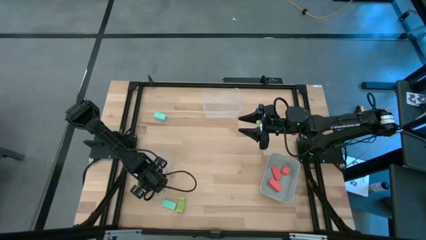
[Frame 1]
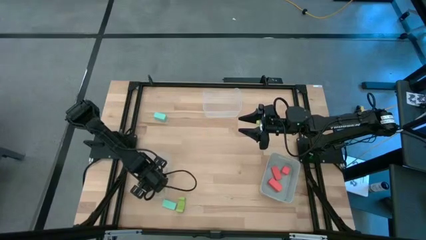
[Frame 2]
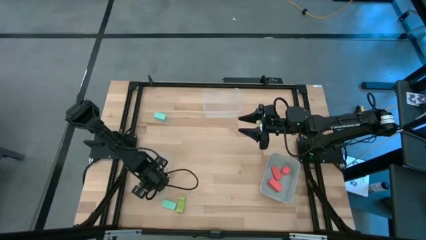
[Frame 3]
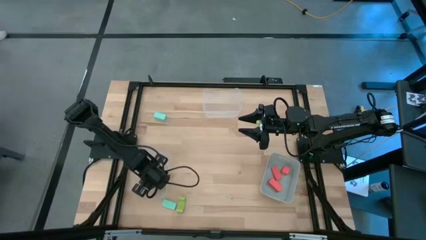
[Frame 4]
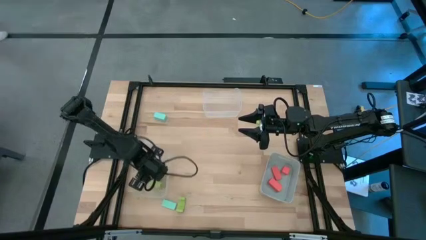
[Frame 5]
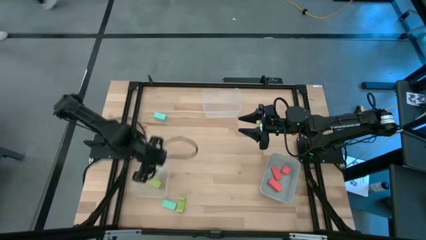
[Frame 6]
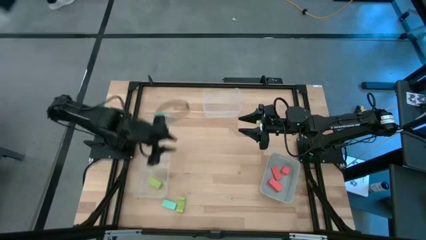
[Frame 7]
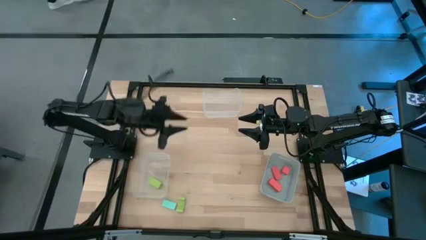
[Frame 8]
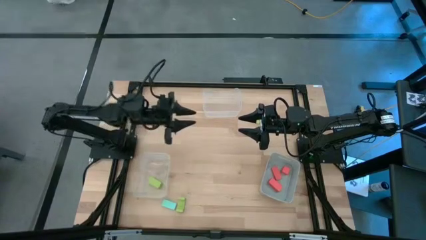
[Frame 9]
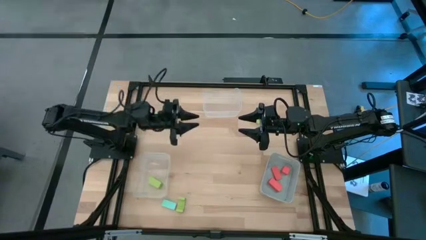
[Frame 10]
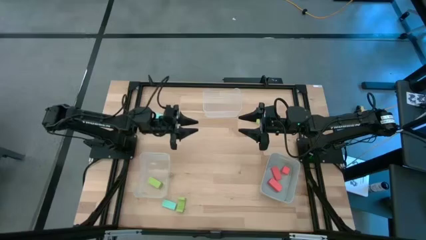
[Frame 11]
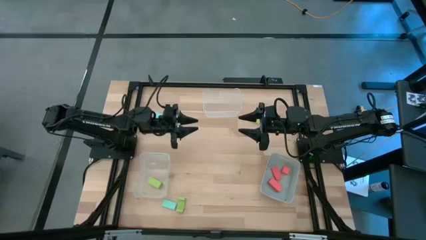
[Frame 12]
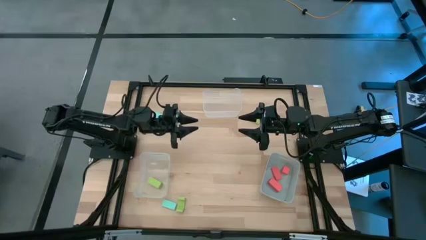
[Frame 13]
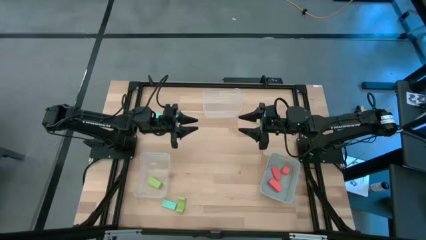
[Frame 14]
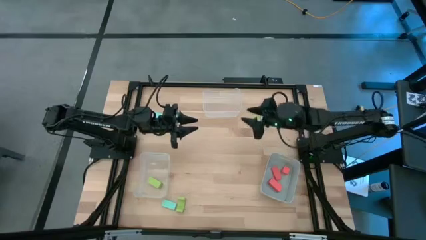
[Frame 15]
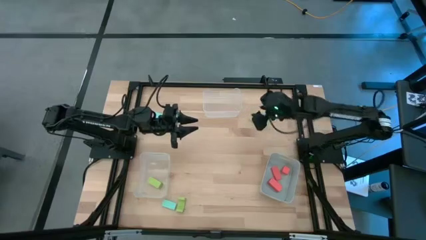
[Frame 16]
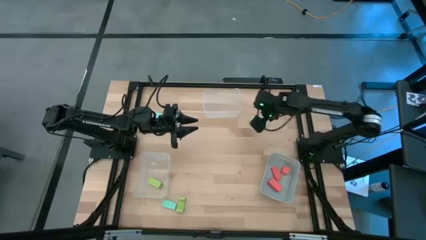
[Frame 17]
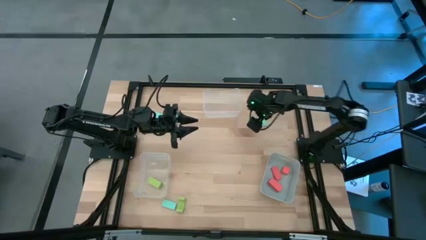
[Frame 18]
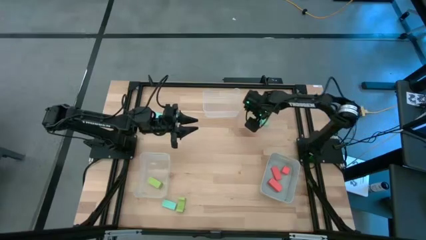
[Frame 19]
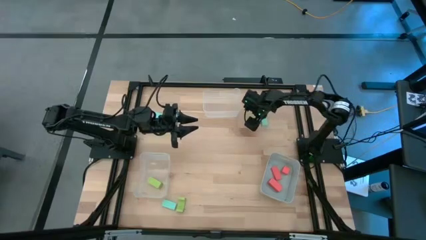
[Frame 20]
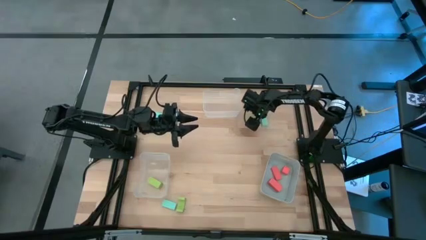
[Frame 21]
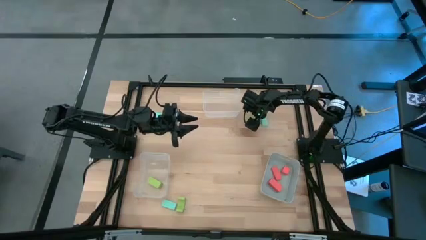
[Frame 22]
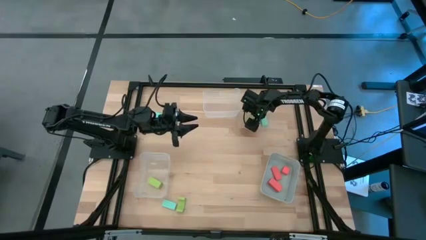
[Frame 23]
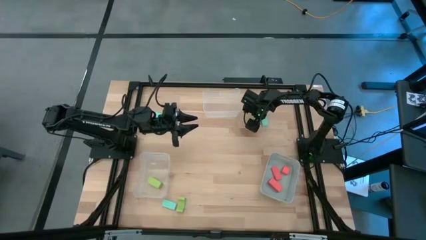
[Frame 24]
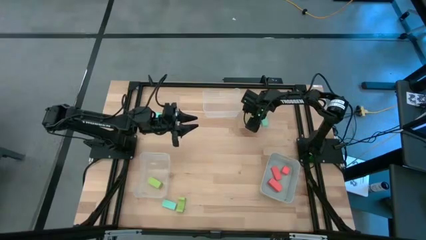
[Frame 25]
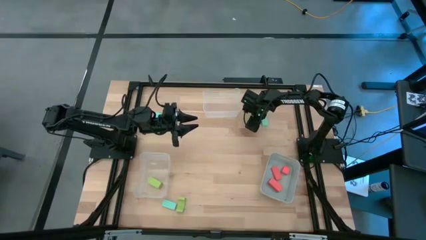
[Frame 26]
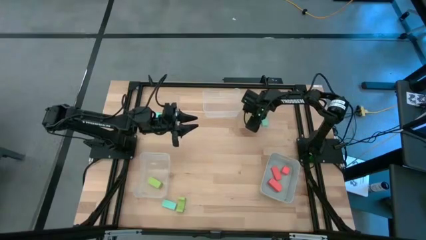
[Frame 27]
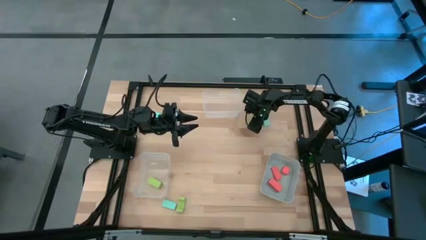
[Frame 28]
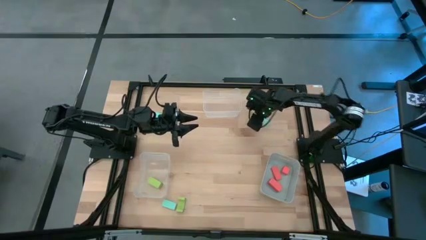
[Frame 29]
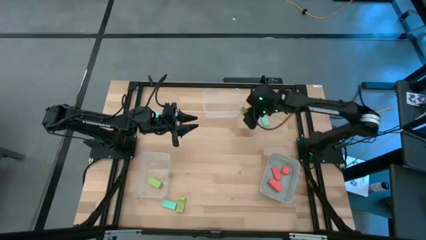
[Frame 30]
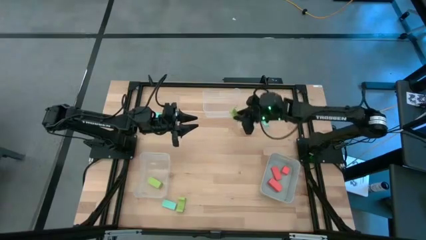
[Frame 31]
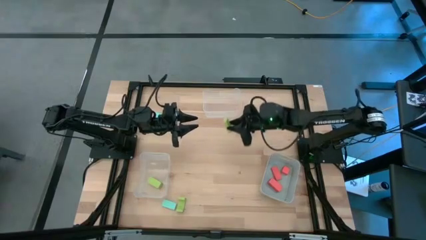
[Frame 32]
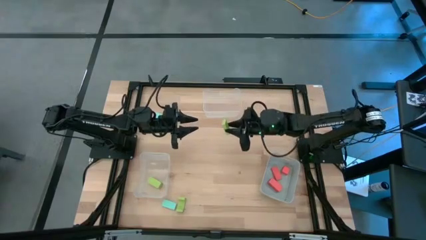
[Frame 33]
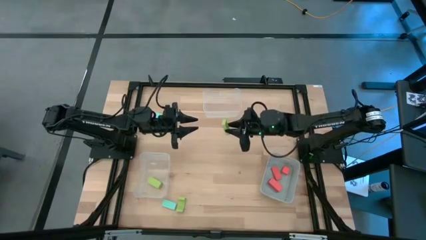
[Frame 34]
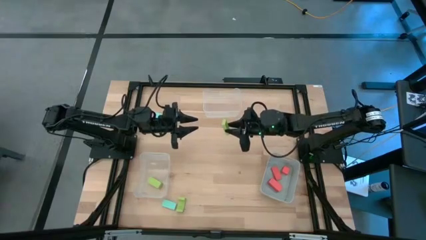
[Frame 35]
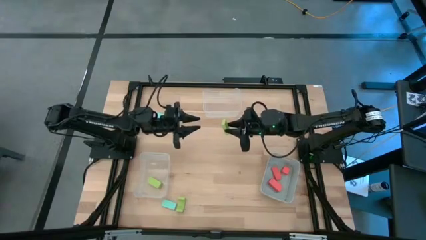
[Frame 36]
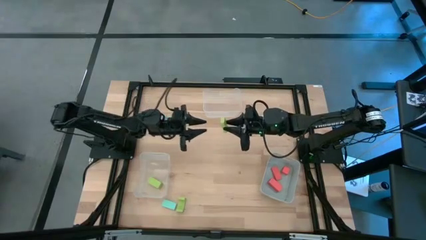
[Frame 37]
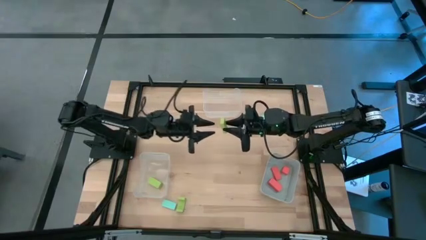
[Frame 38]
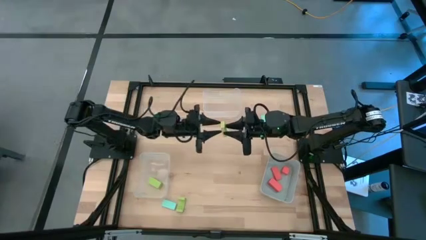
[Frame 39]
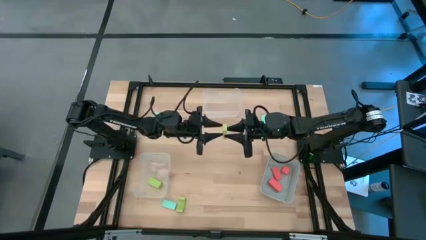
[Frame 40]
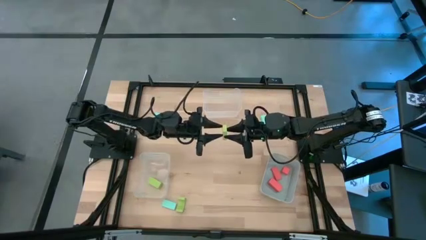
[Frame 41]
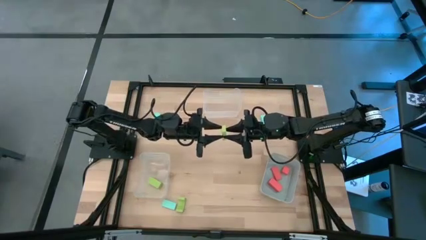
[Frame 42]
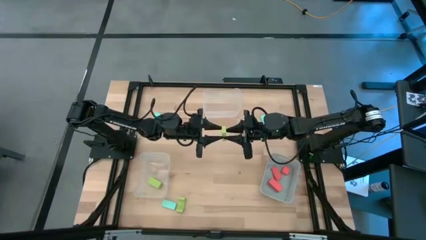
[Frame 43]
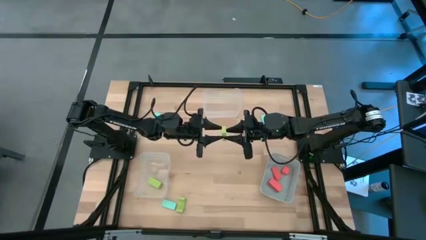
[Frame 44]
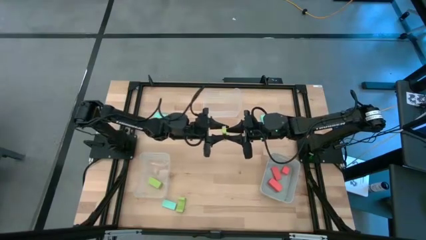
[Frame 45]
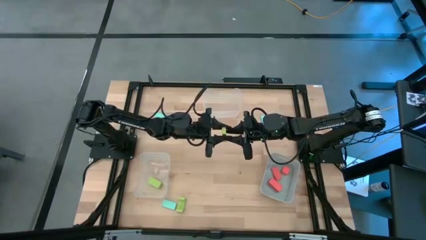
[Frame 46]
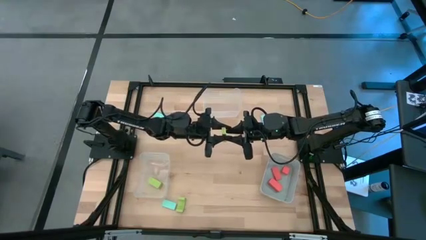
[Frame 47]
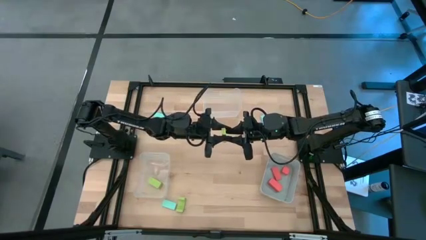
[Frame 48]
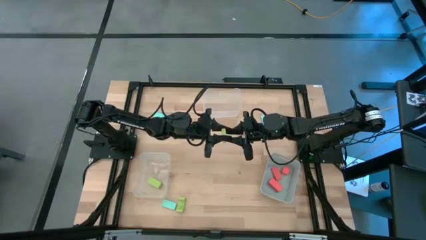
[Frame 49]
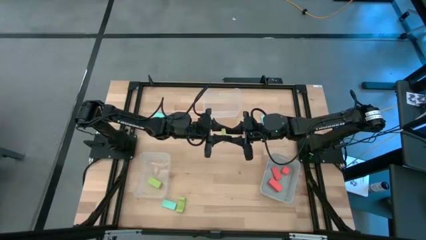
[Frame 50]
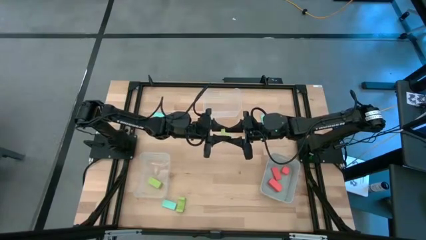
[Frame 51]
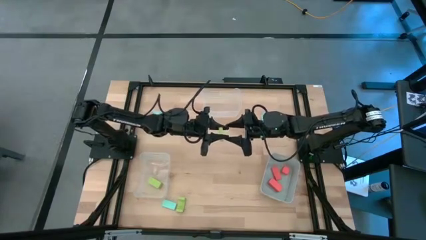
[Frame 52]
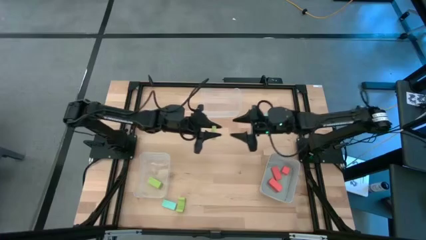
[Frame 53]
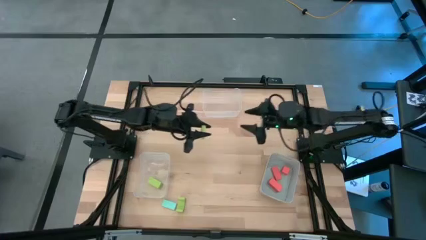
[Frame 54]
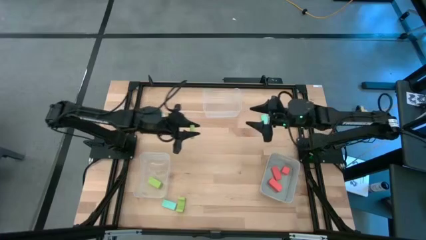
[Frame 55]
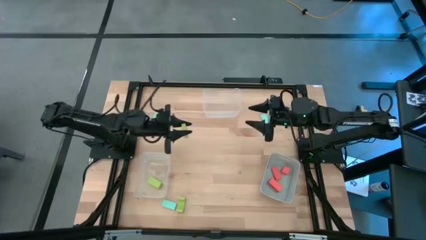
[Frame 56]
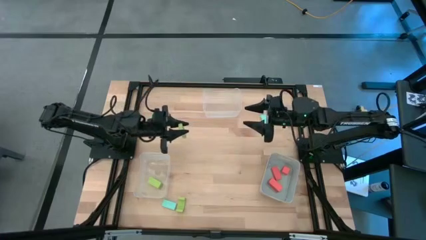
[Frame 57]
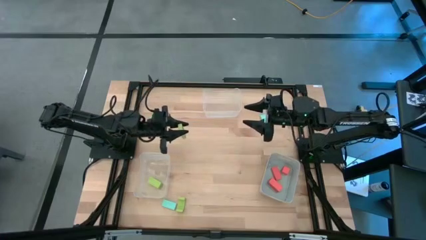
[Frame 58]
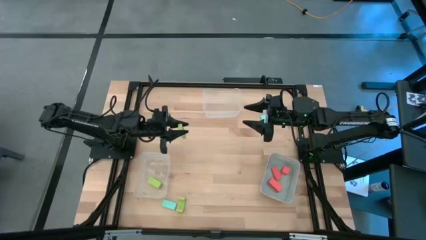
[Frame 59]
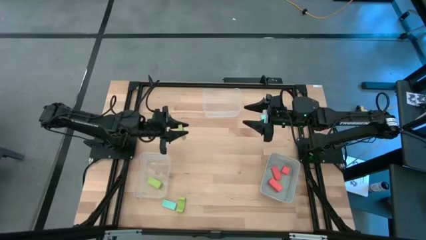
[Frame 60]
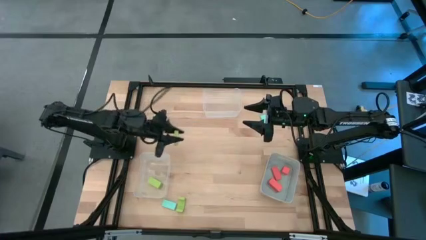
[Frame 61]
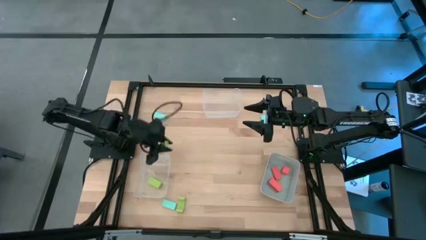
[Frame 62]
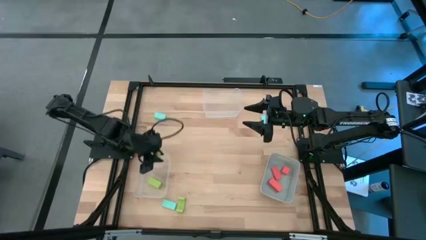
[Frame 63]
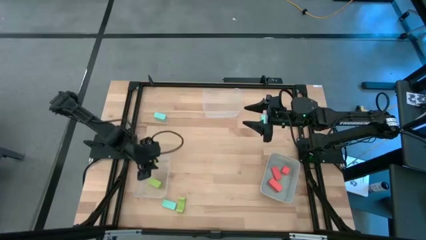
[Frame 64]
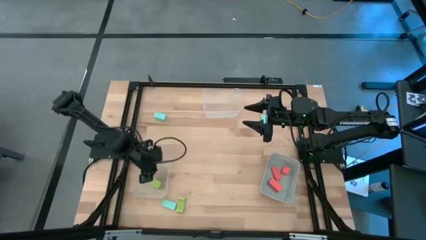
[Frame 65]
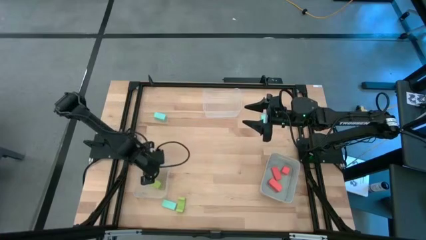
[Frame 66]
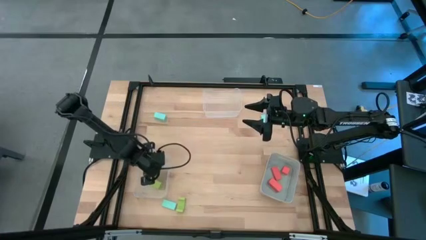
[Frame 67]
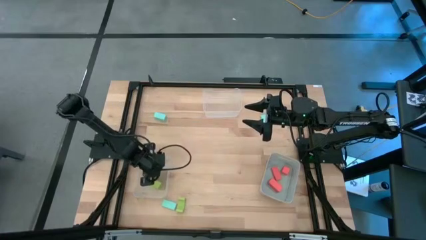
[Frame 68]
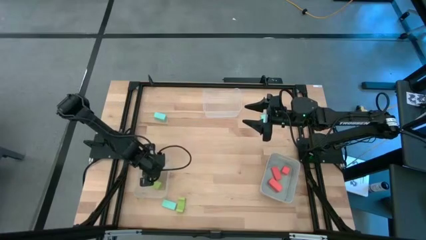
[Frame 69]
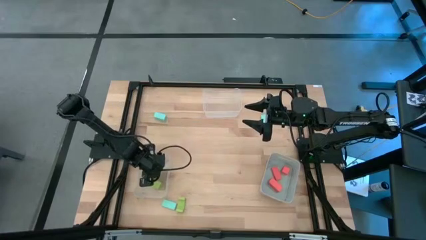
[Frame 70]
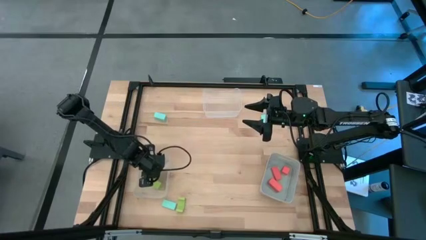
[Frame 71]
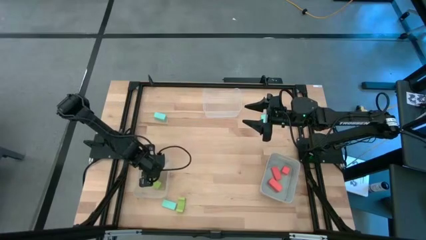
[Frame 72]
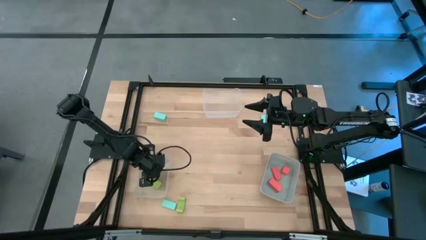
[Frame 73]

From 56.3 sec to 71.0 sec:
Task: Sort & place blocks by color
Put the top green block into the bottom transparent bin
